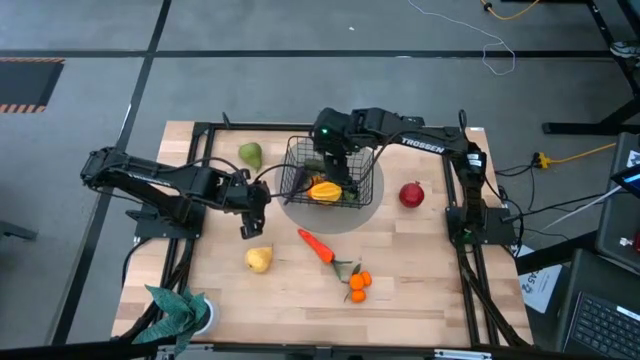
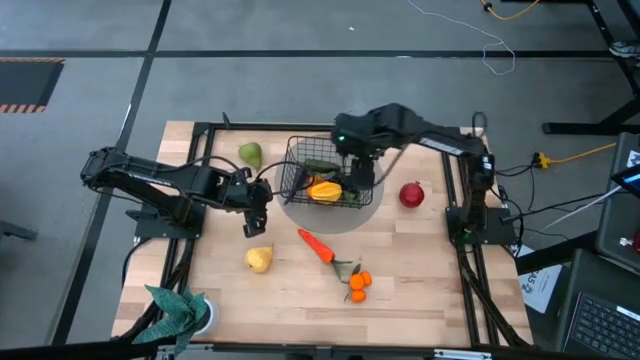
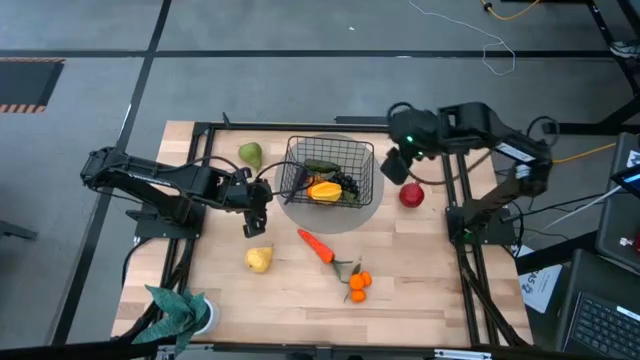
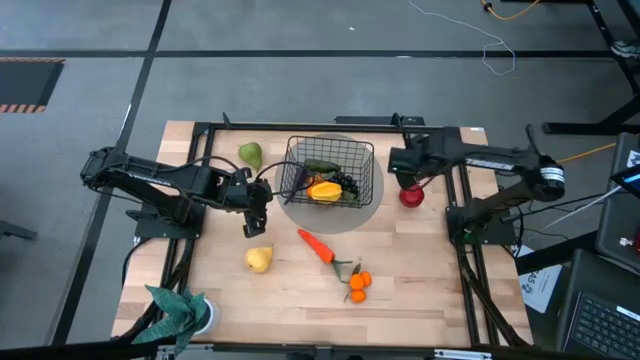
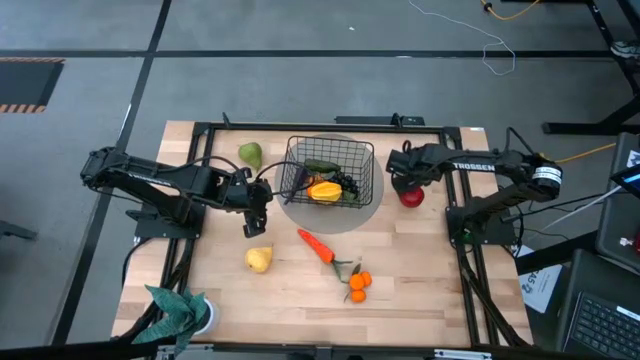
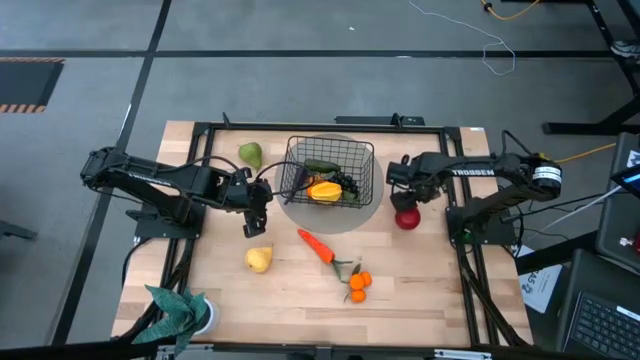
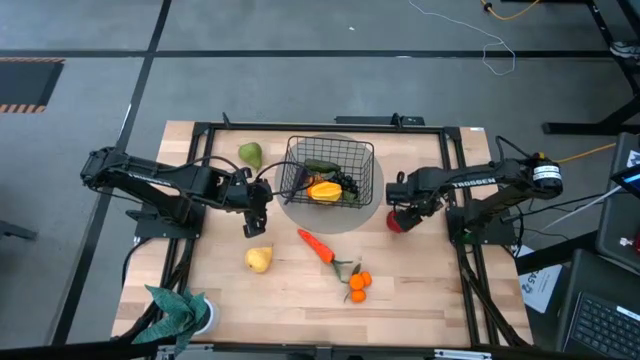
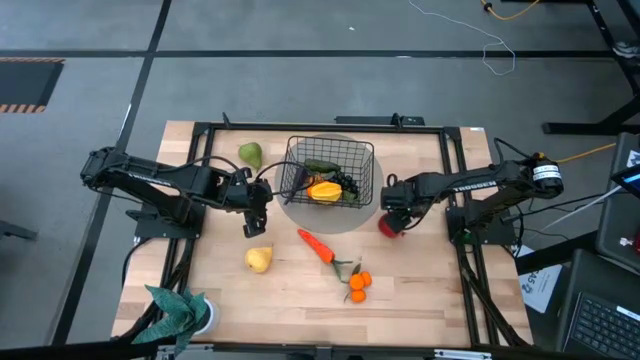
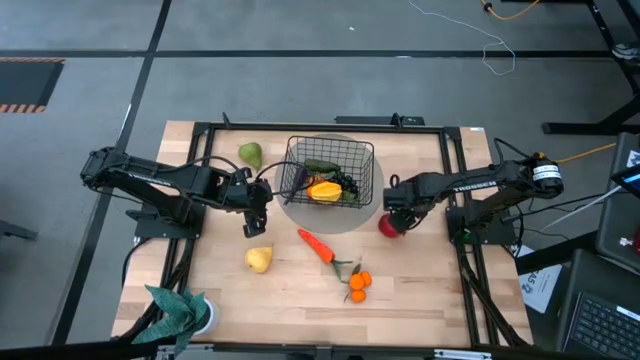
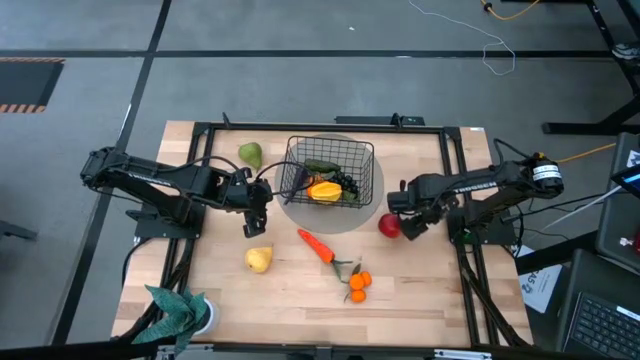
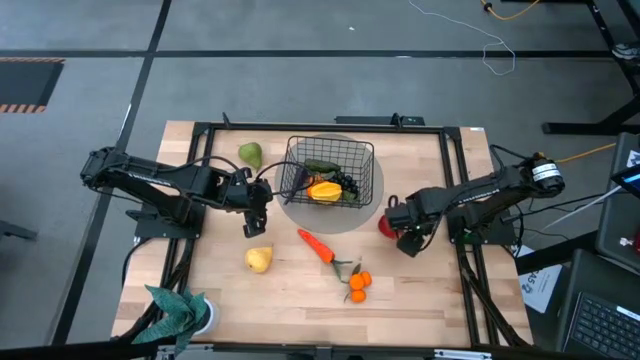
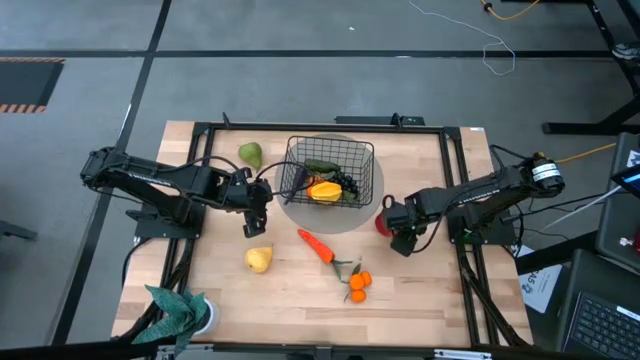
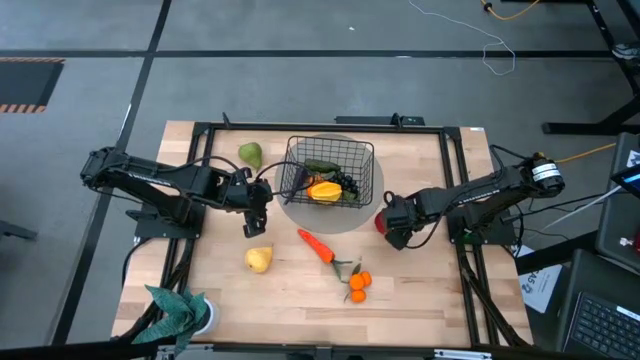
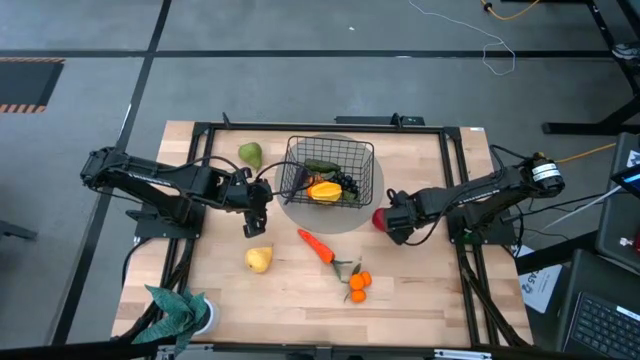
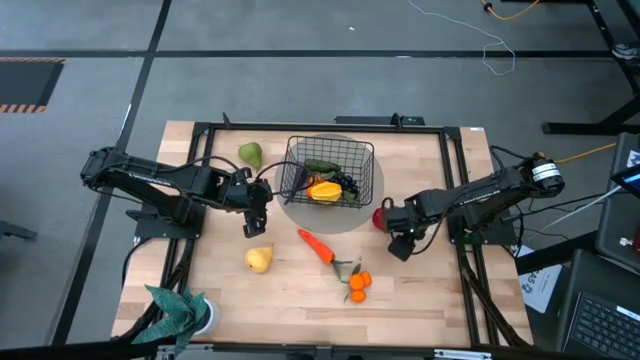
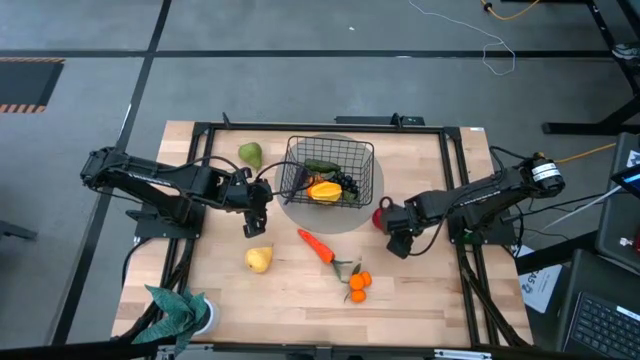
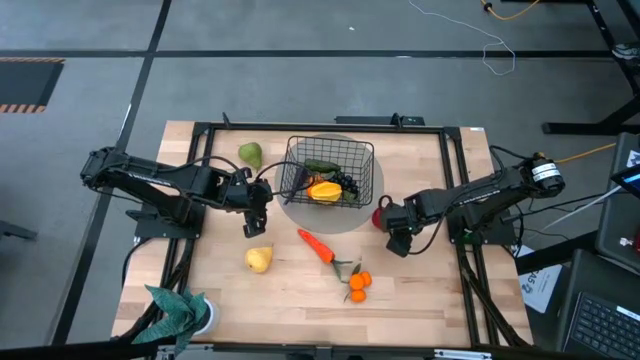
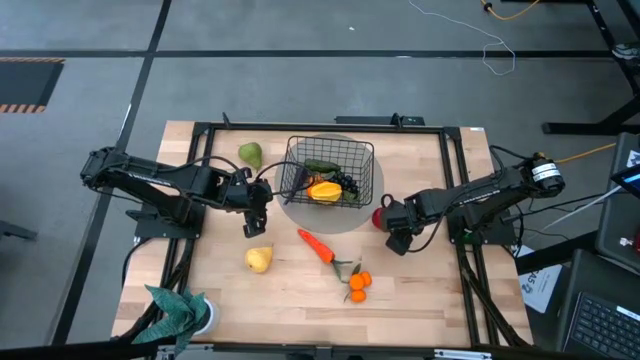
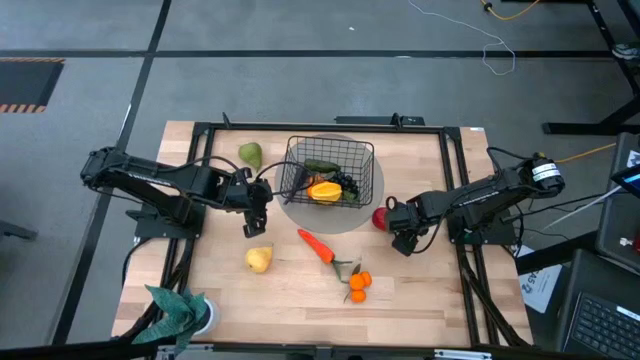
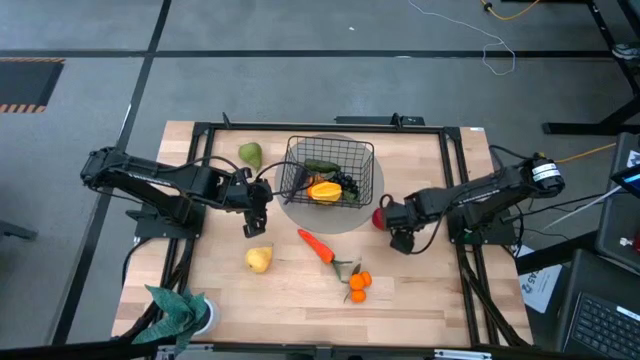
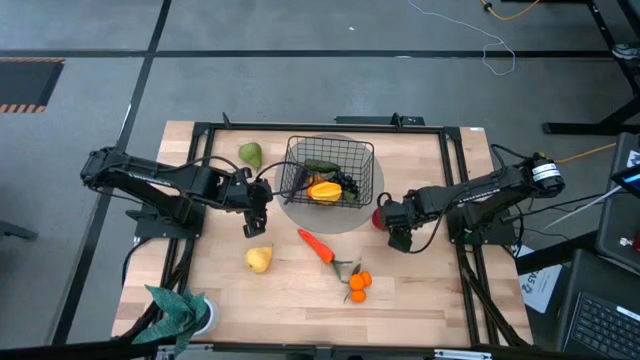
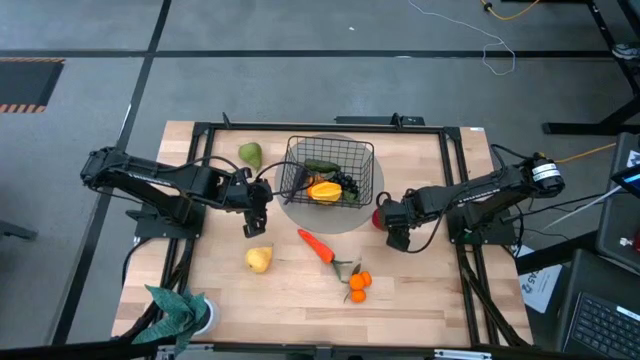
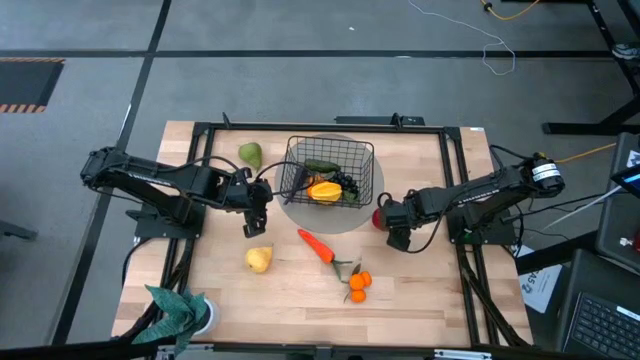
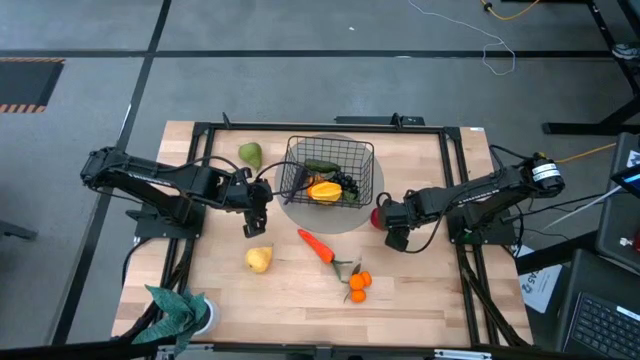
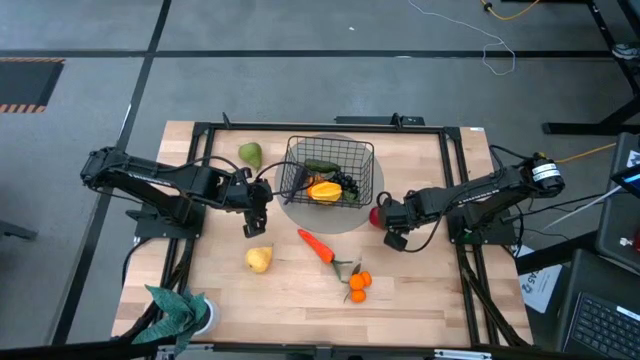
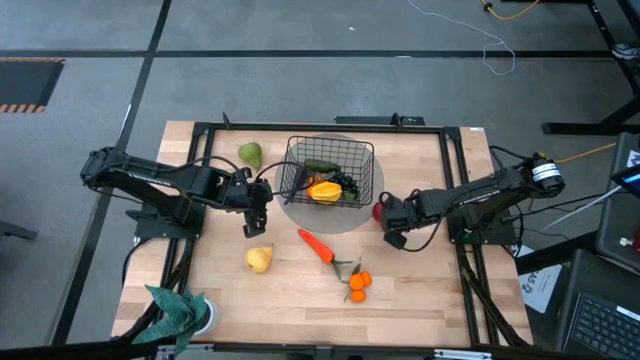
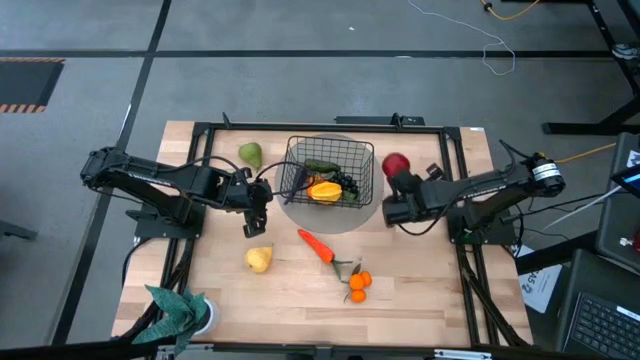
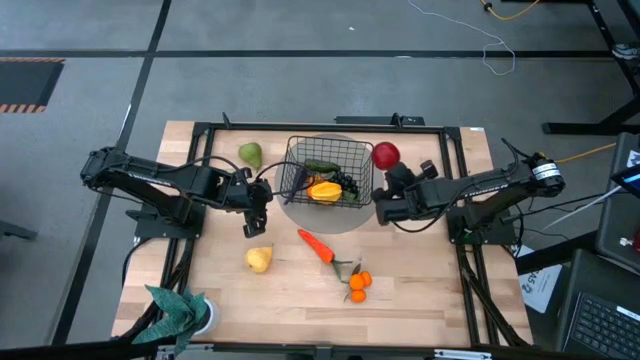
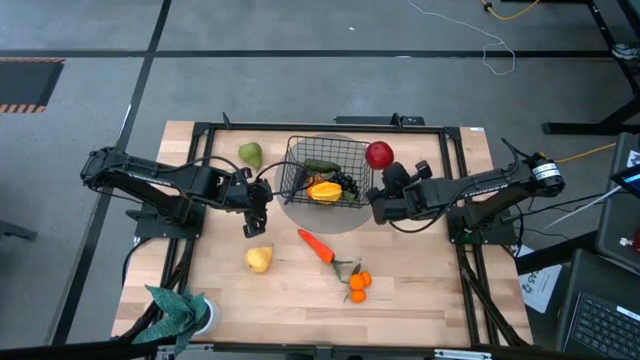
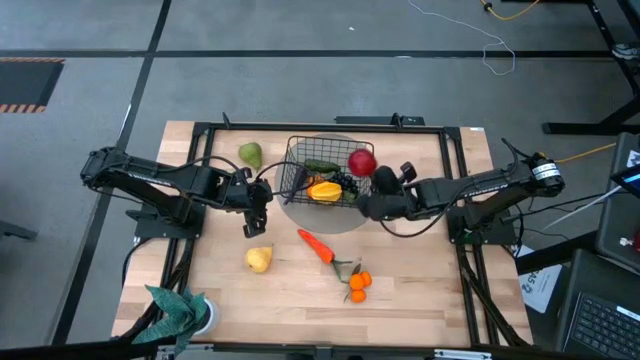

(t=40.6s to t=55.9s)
Task: Build produce basket
Put the red pomegranate into the black wire basket

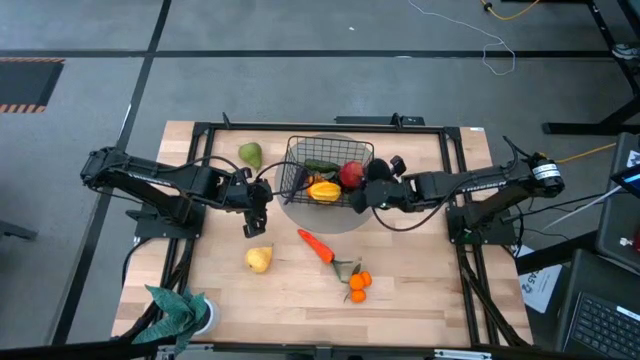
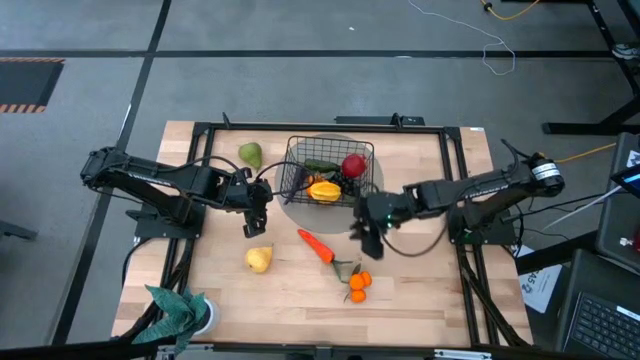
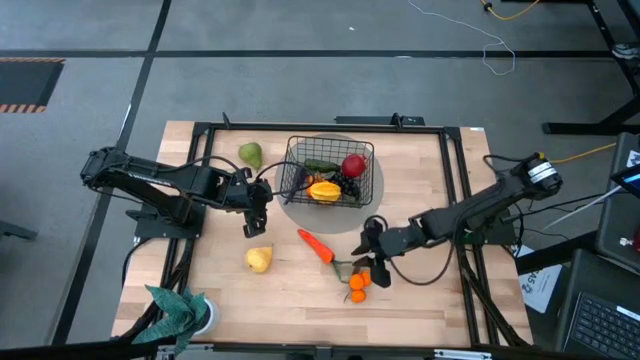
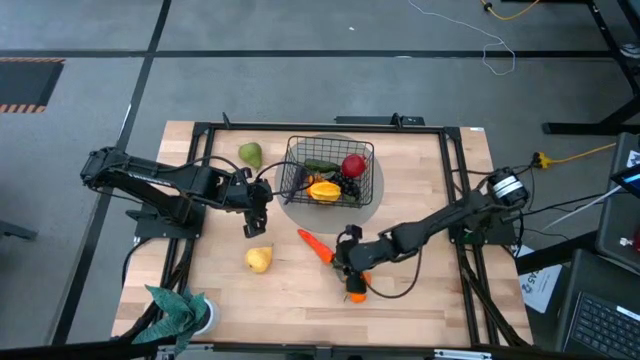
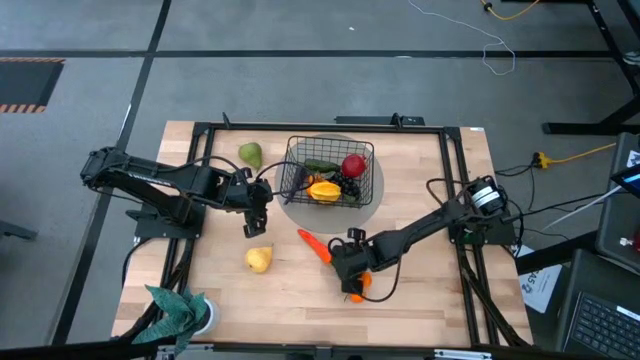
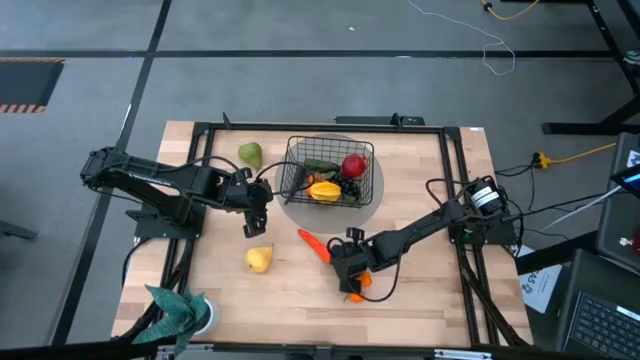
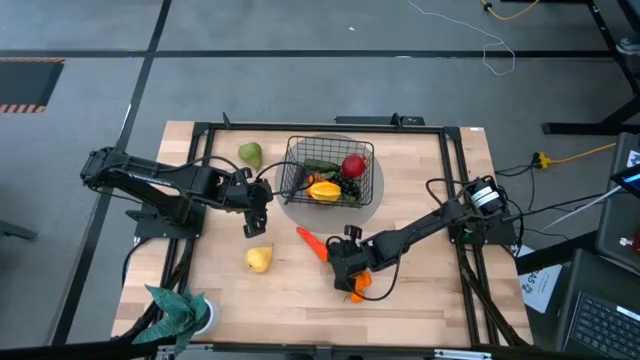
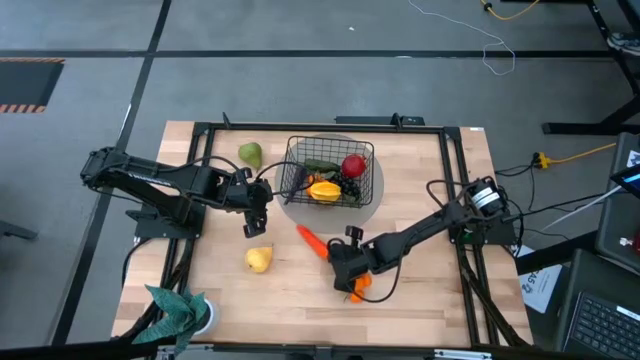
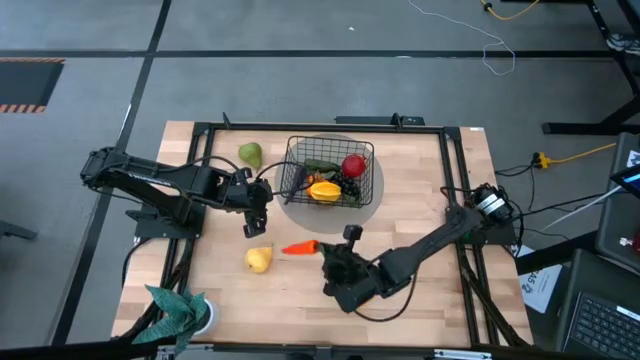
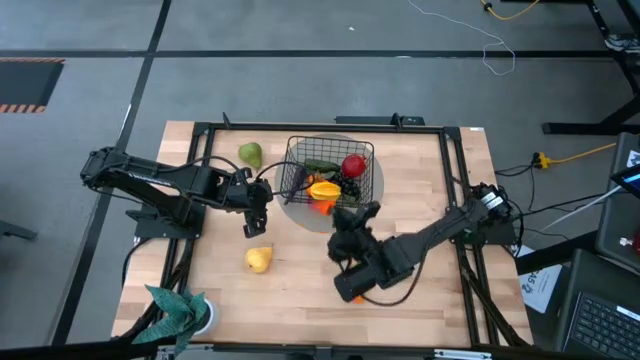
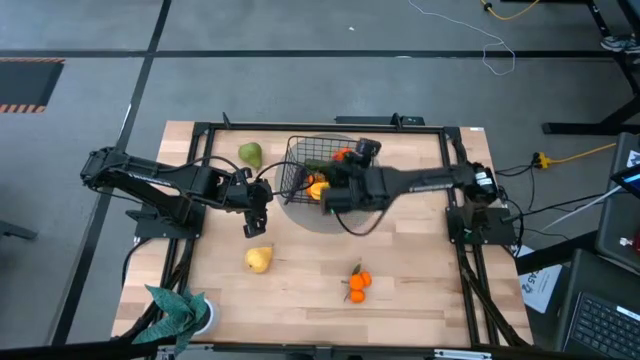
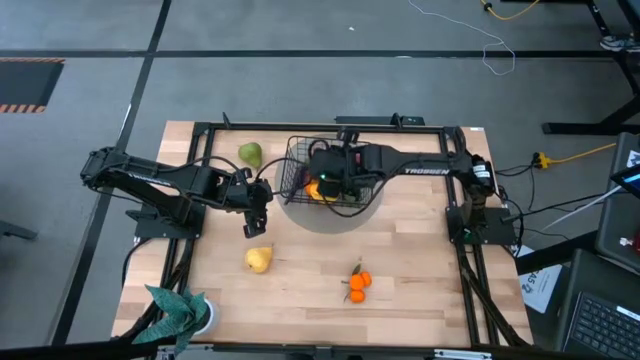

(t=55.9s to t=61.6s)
Put the orange carrot into the black wire basket
